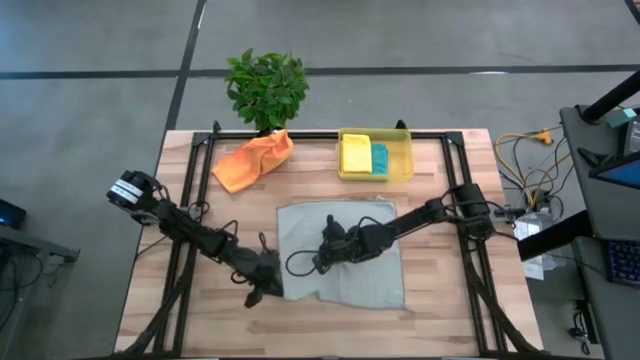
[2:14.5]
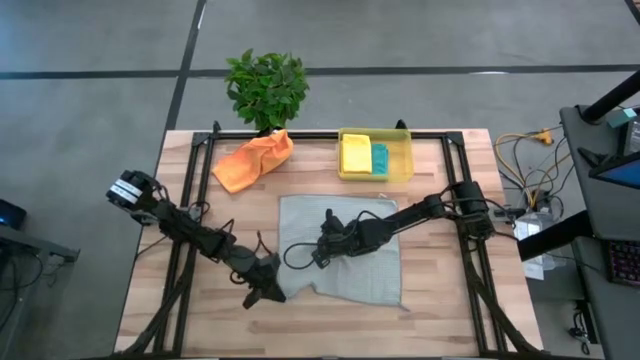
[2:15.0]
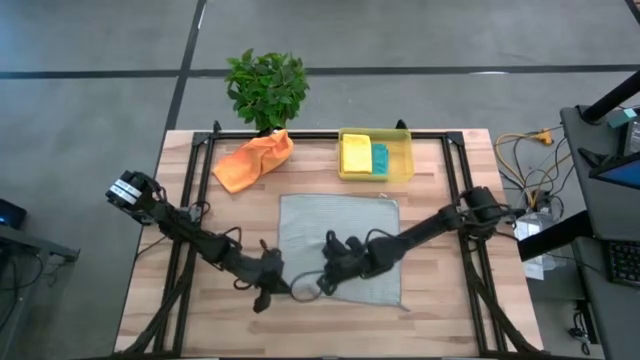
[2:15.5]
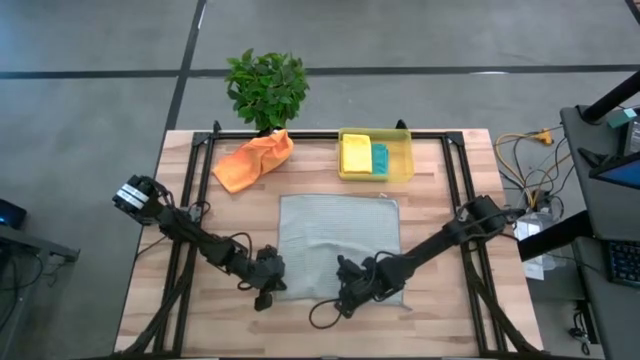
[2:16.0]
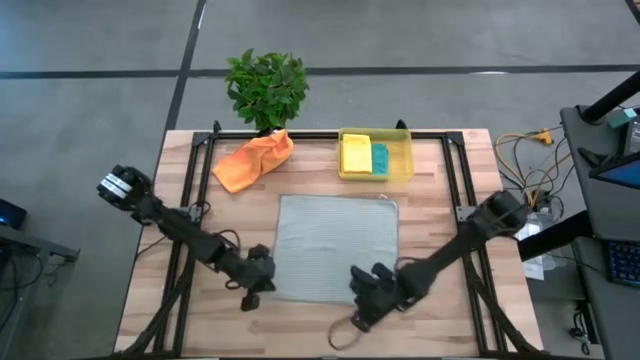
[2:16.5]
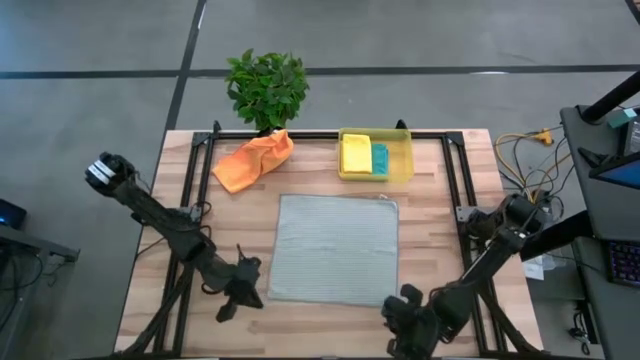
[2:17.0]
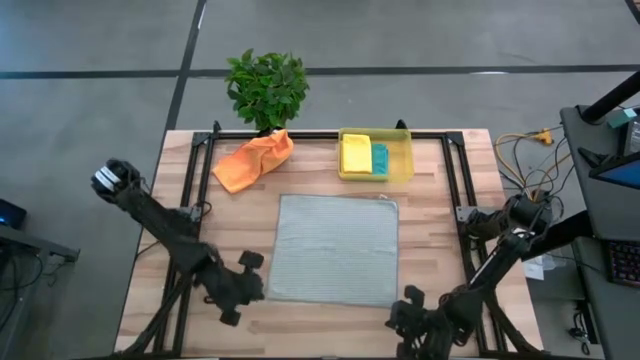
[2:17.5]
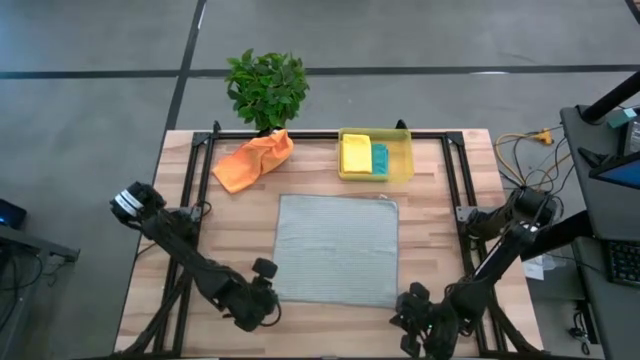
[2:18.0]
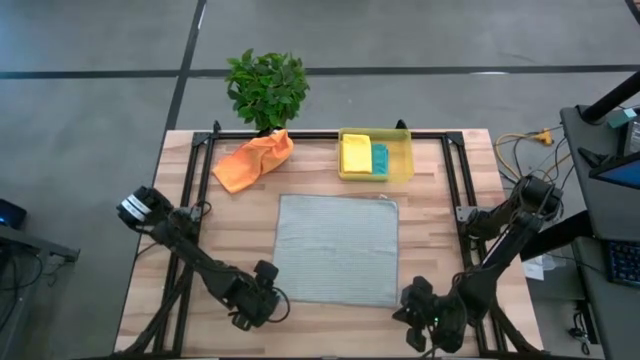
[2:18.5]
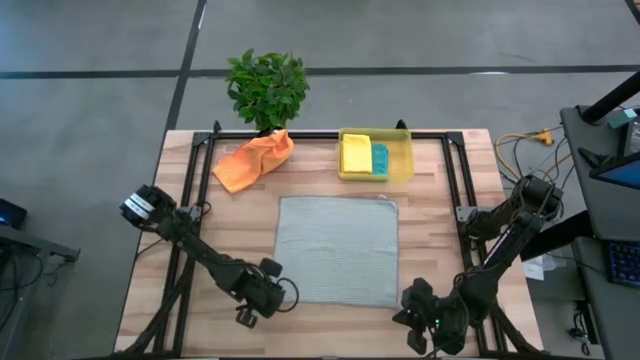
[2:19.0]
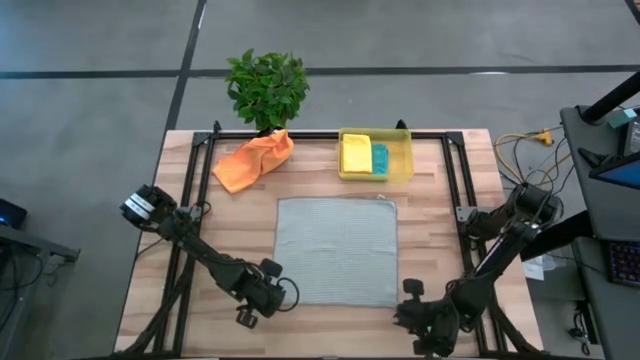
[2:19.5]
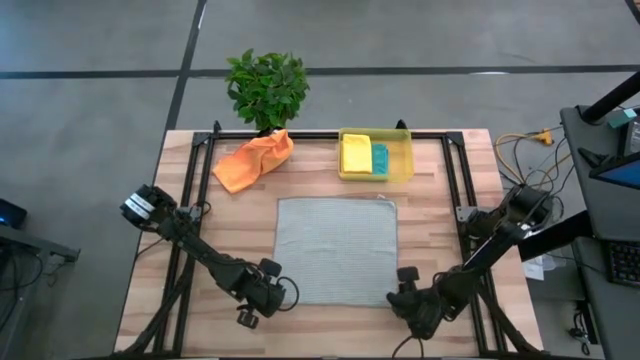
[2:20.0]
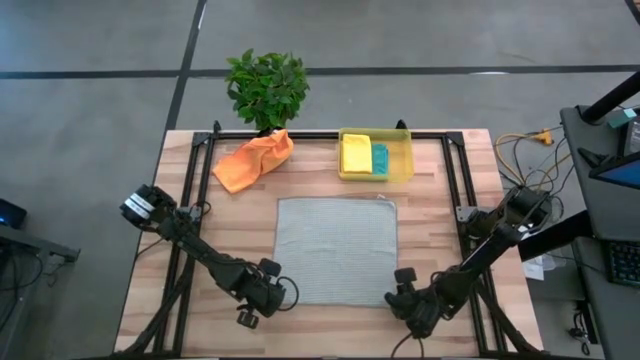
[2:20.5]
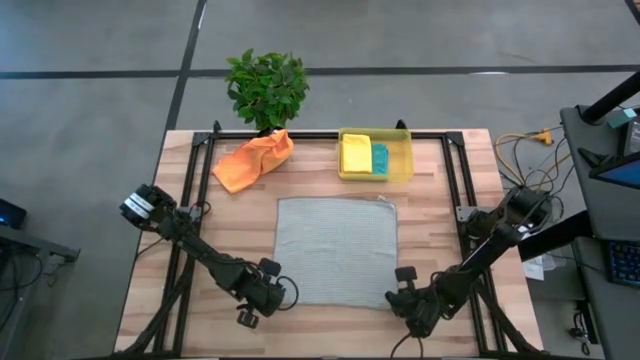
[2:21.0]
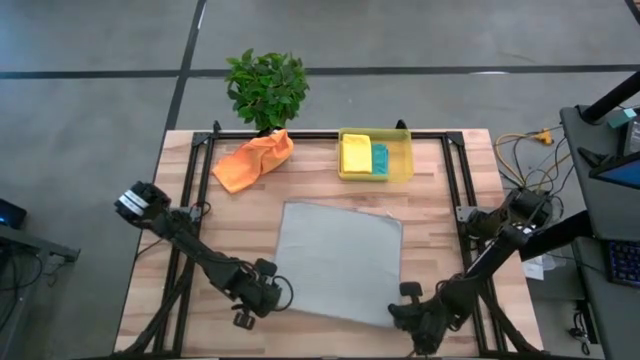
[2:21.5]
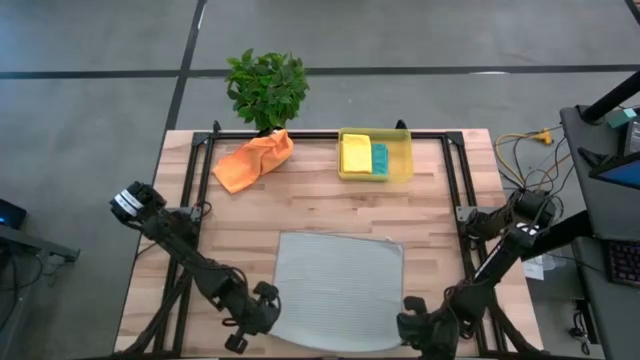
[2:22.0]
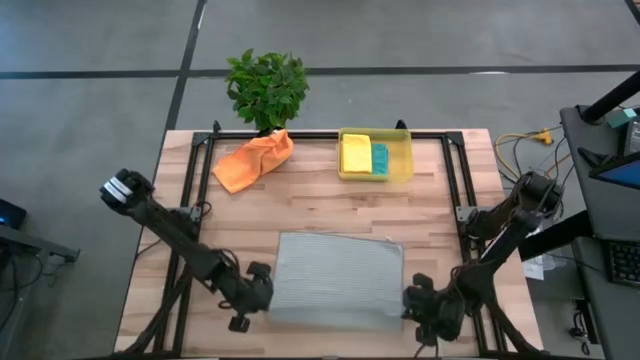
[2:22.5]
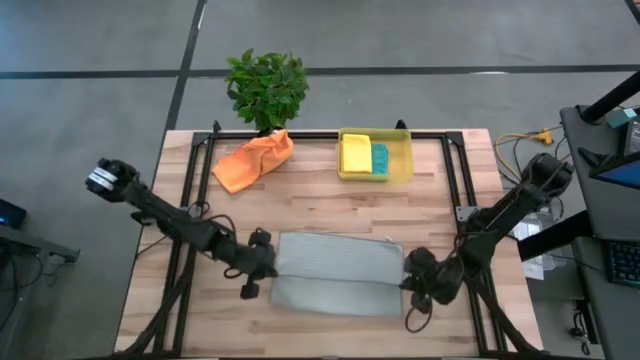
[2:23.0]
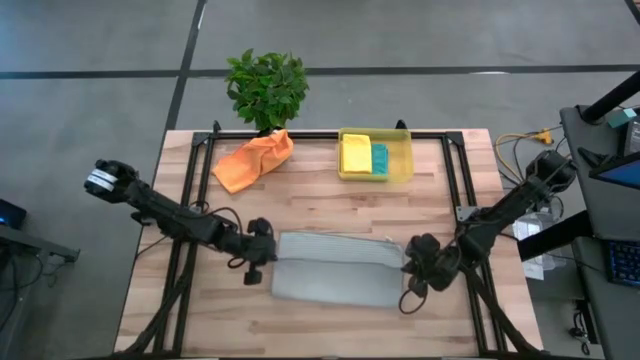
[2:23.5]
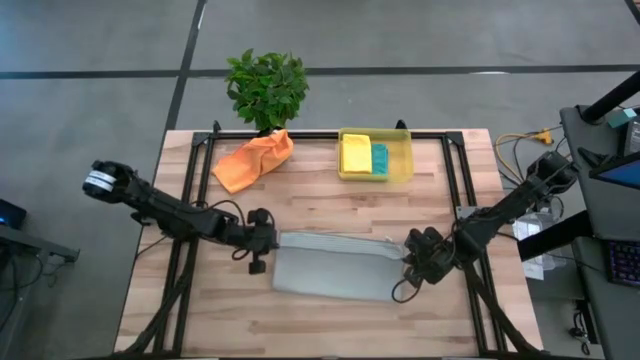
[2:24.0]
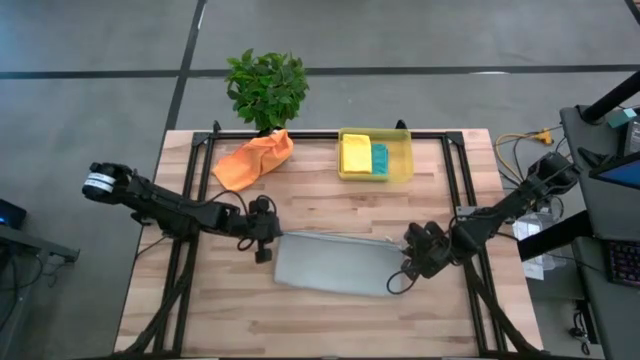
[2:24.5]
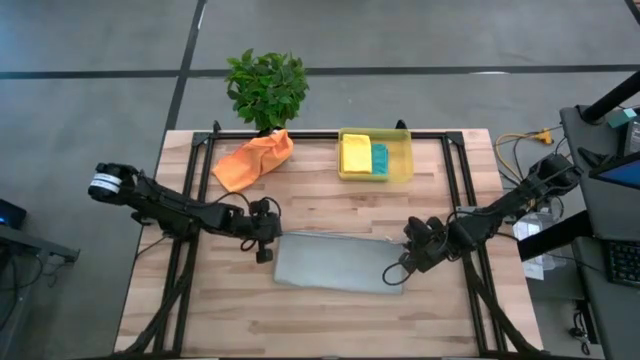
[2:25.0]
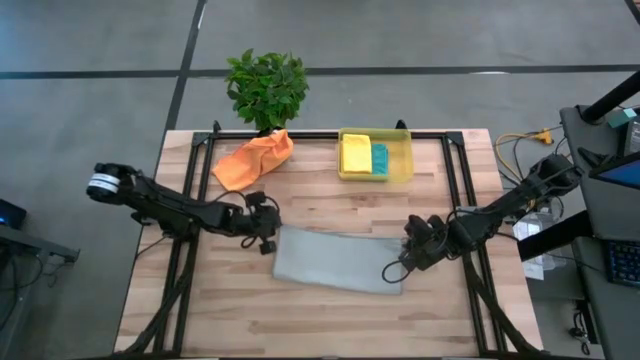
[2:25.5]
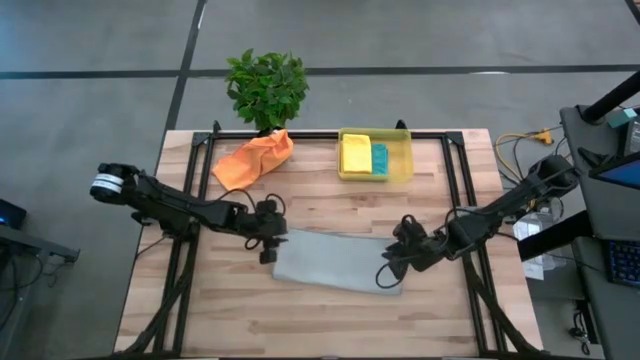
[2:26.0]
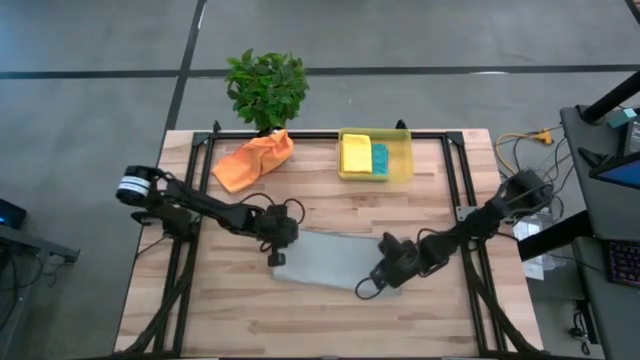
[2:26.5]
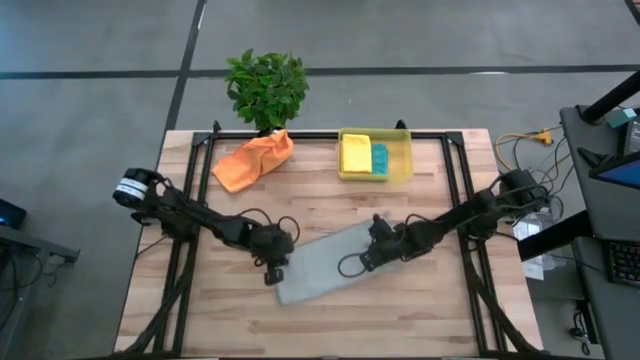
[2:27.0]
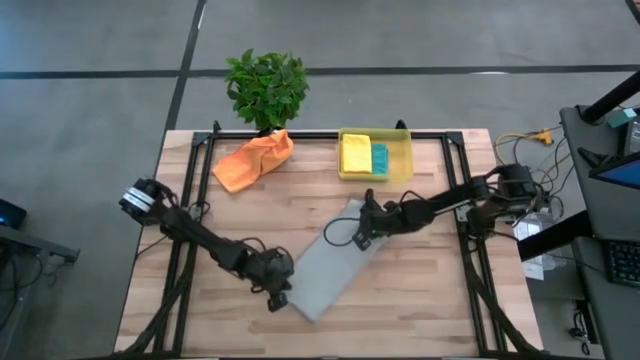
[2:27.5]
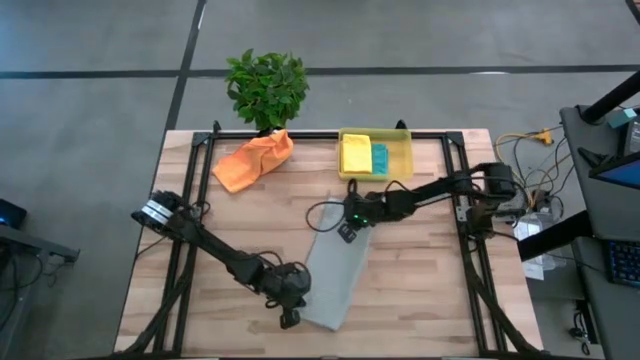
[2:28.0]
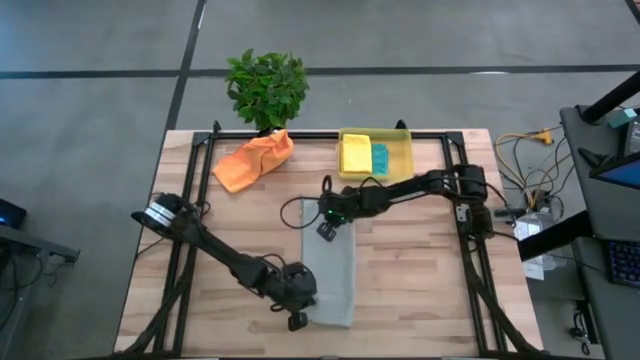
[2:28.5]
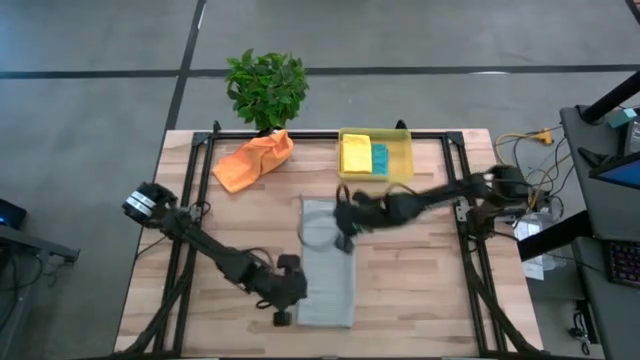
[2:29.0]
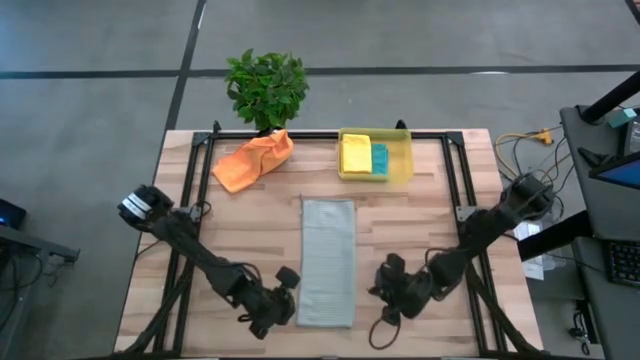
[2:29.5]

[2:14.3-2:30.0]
Task: Fold microfiber towels
Fold the gray microfiber towel

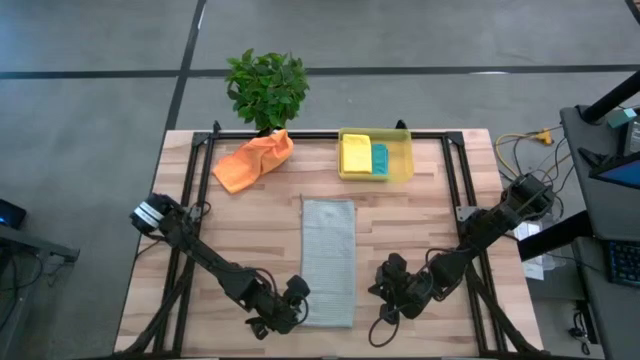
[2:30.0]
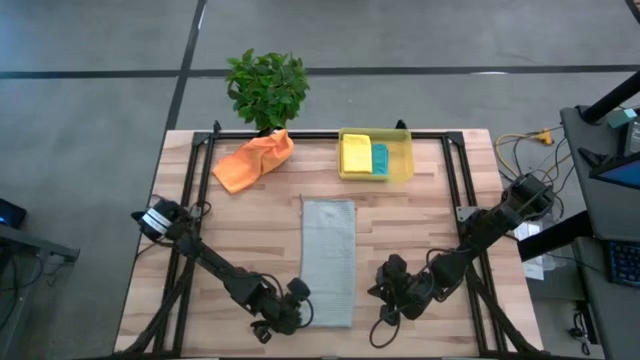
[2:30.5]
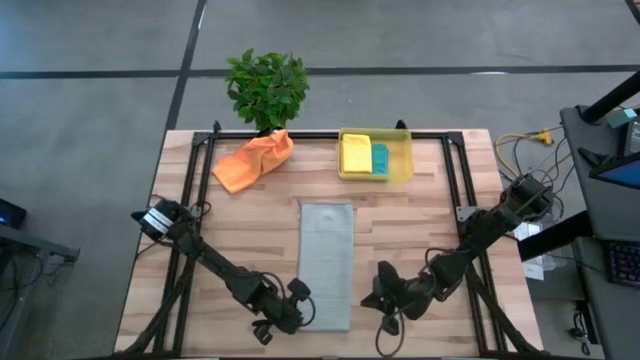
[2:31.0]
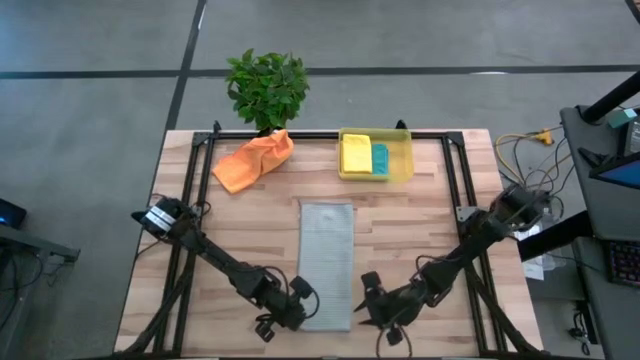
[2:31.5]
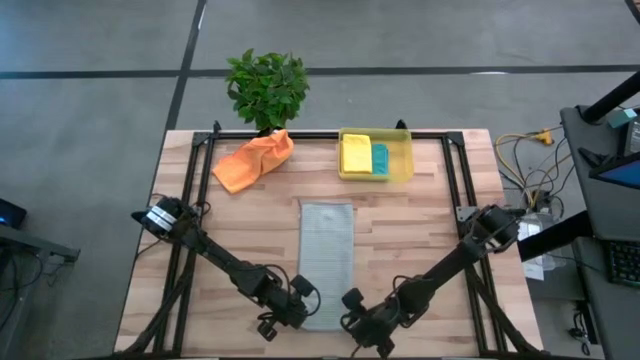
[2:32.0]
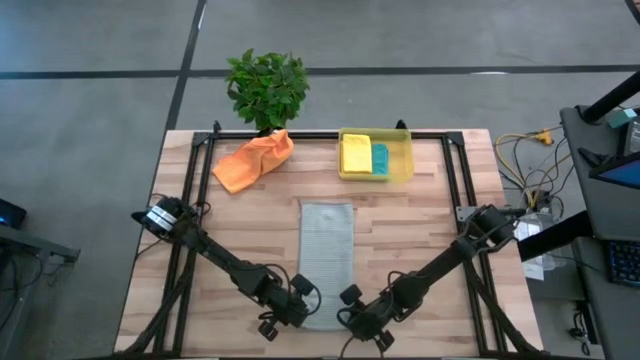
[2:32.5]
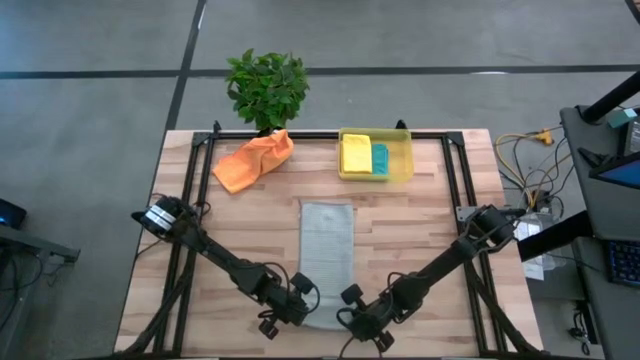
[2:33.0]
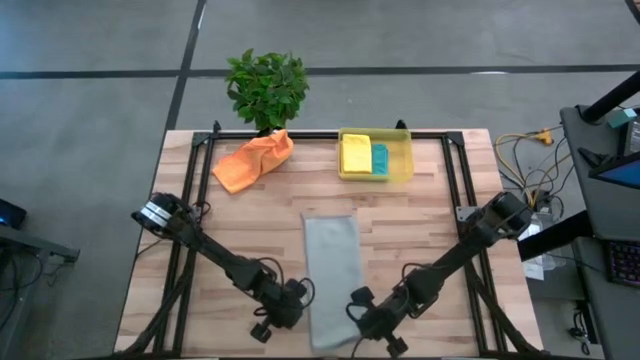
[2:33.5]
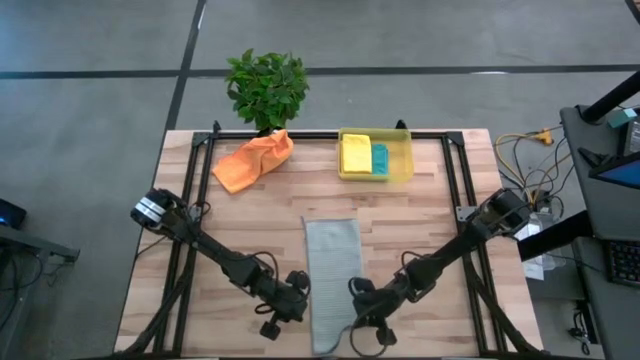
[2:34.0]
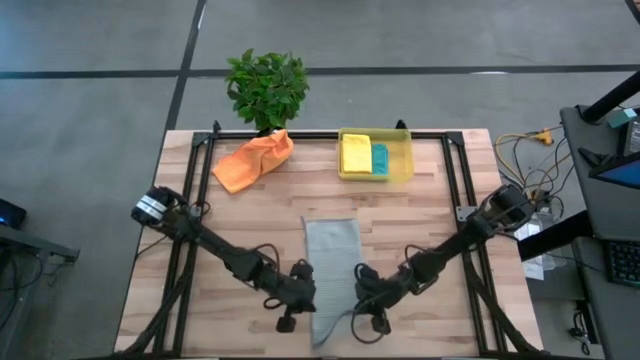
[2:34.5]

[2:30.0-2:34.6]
Fold the gray microfiber towel
